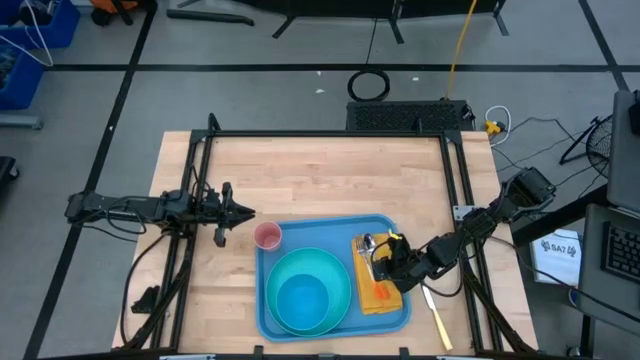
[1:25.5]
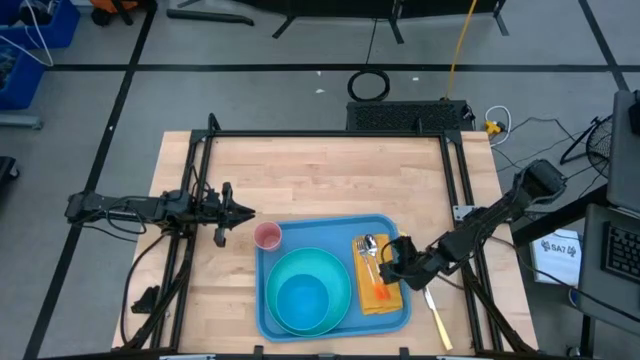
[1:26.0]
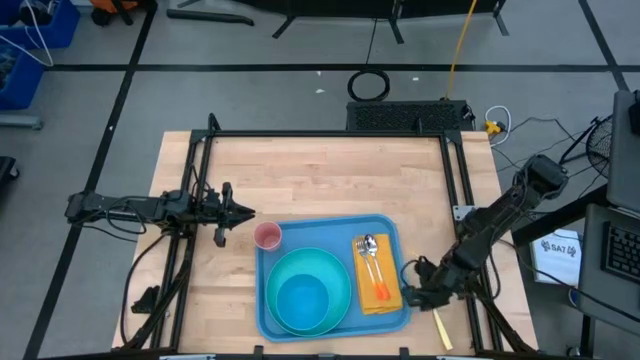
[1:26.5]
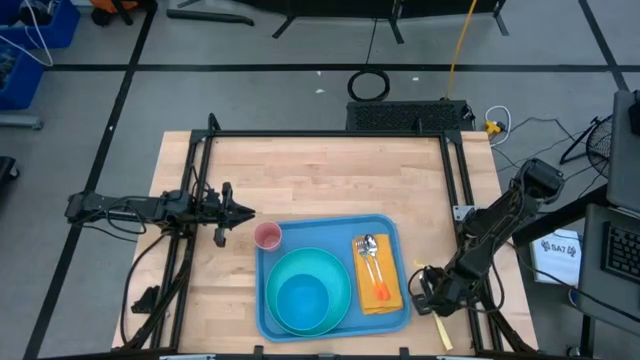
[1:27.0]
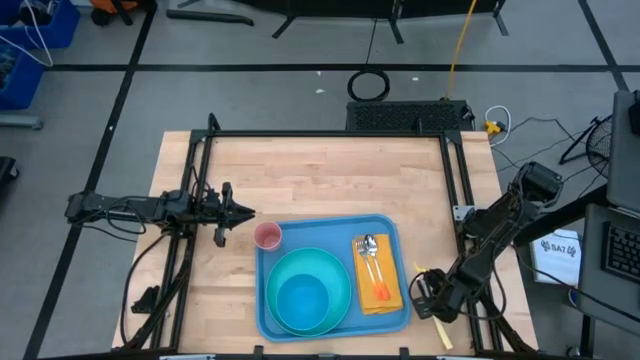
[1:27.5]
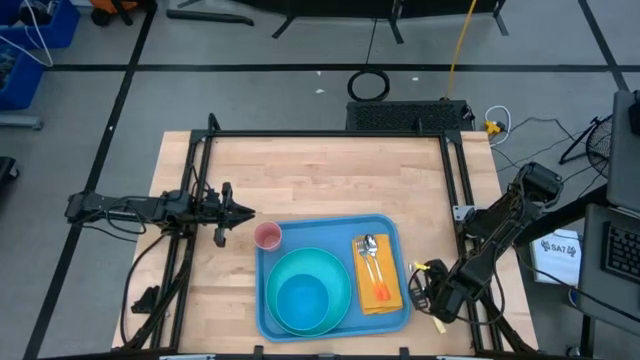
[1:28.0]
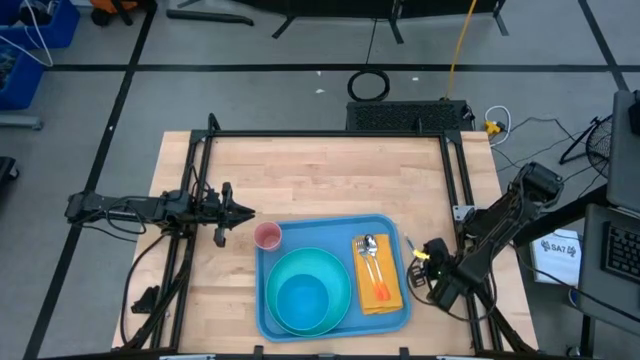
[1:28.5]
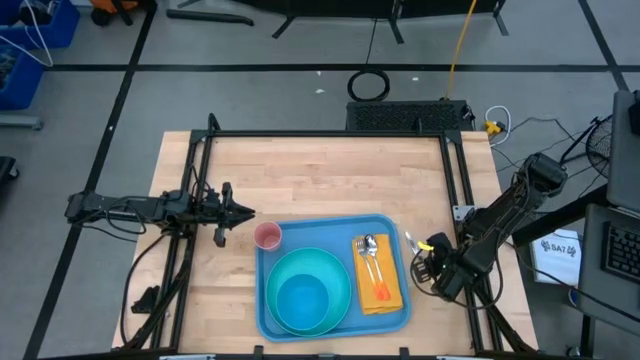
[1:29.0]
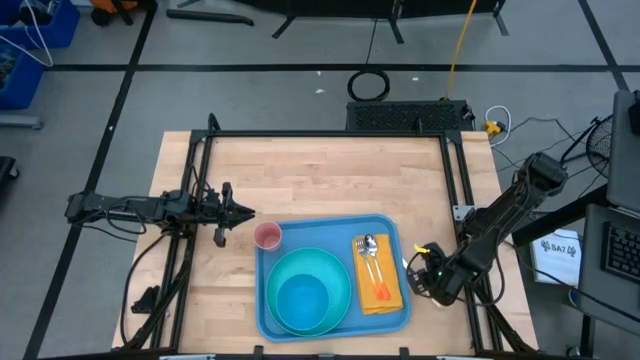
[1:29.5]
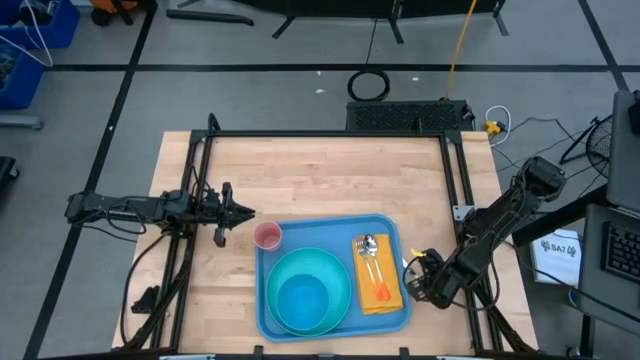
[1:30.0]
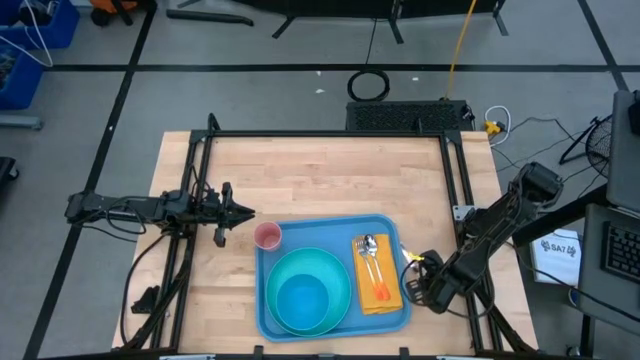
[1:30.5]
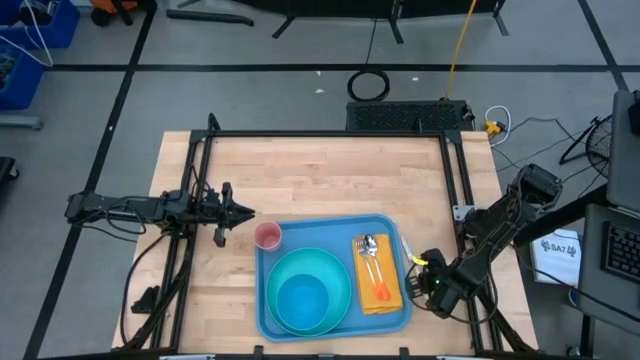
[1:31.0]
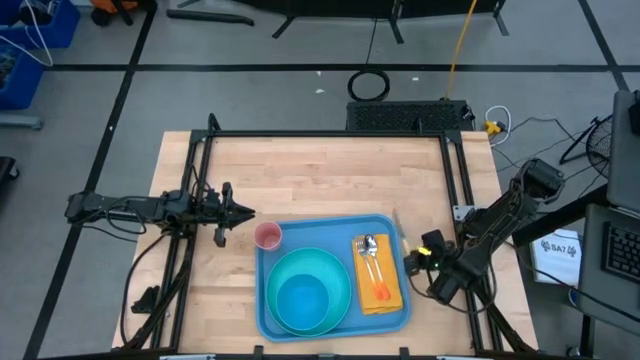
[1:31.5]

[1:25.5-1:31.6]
Task: Set up tray
Put the yellow knife on top of the yellow napkin to the right of the orange spoon

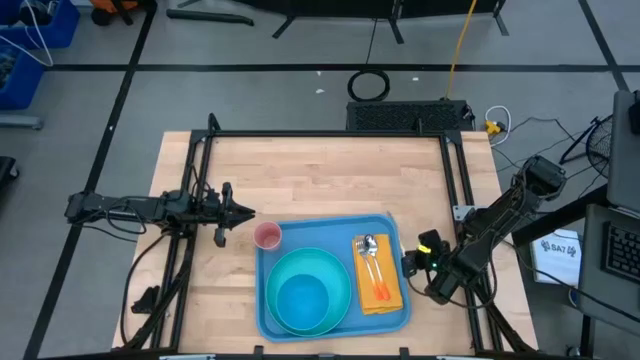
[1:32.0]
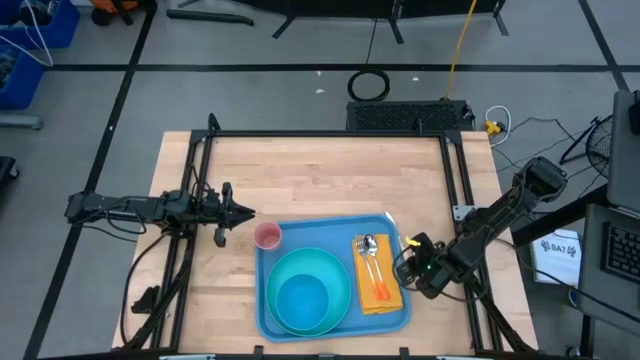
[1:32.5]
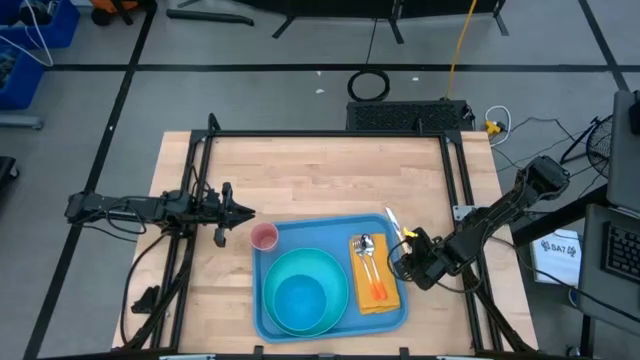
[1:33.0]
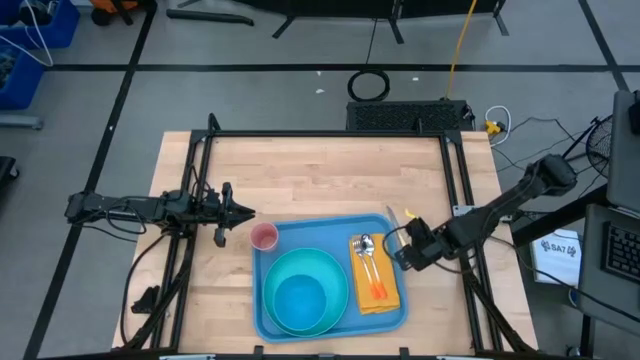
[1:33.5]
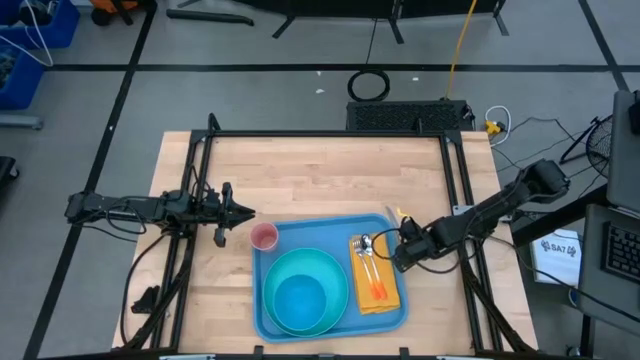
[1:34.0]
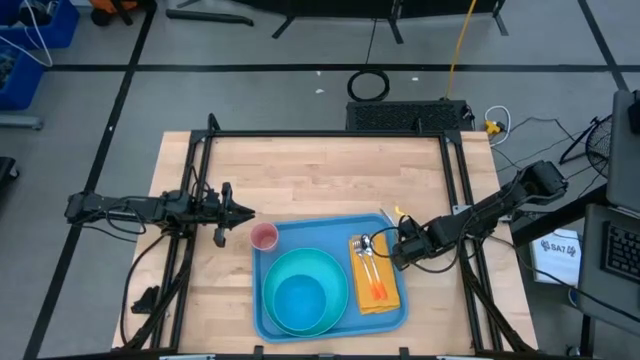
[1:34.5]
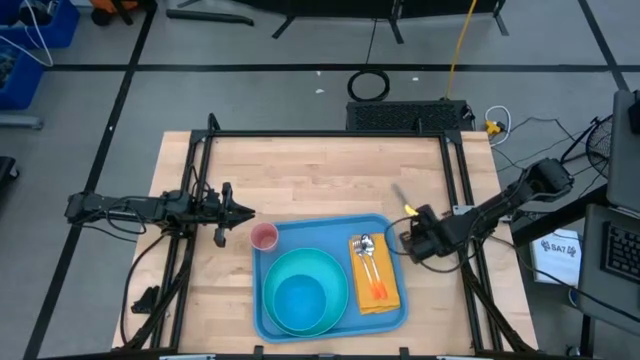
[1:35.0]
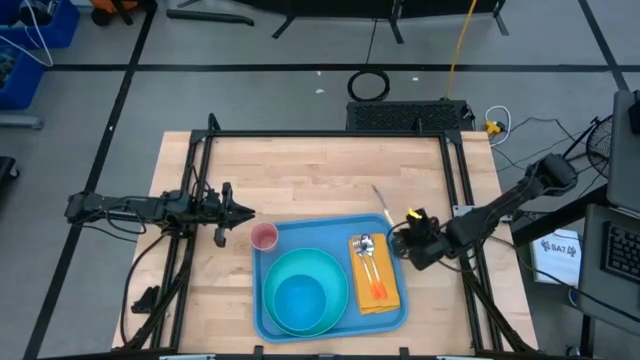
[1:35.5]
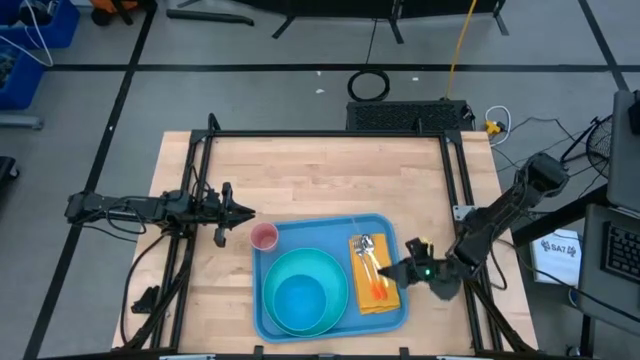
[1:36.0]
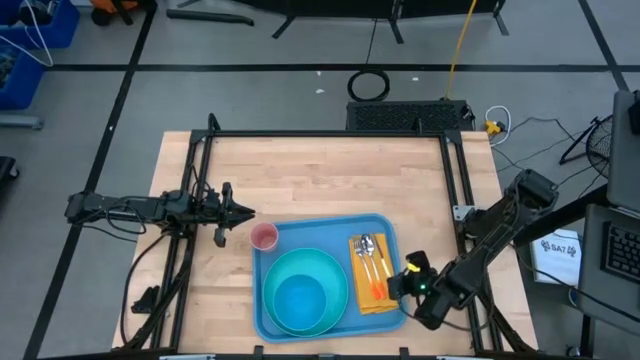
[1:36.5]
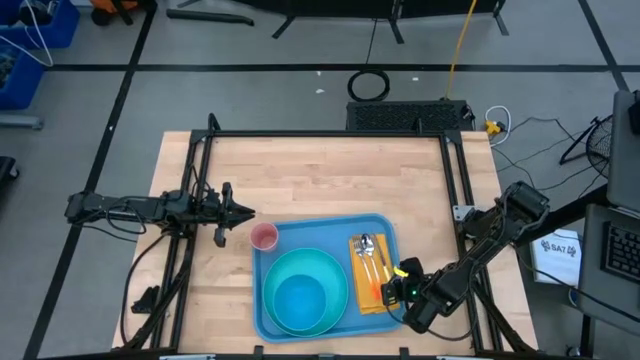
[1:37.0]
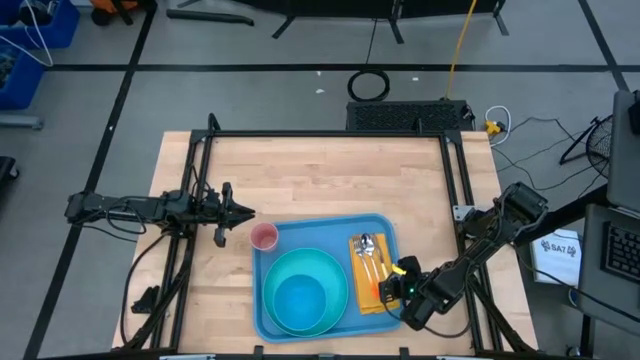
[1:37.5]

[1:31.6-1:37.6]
Put the yellow knife on top of the yellow napkin to the right of the orange spoon

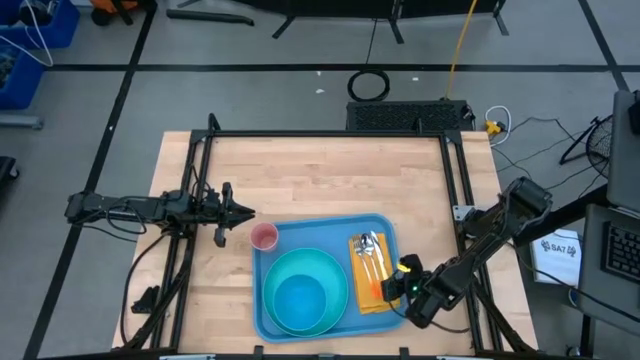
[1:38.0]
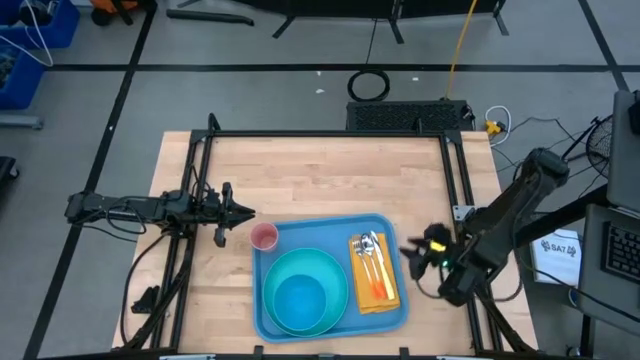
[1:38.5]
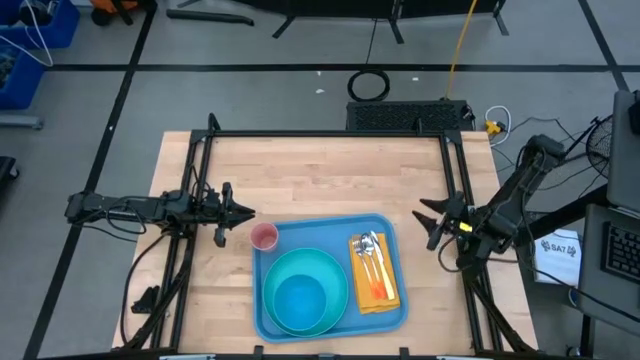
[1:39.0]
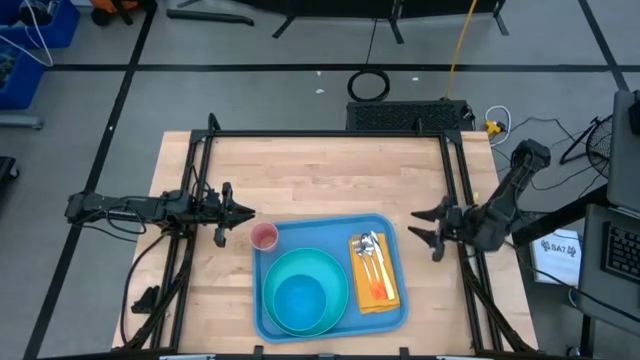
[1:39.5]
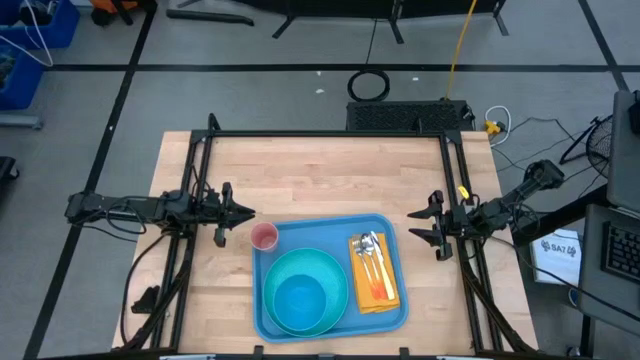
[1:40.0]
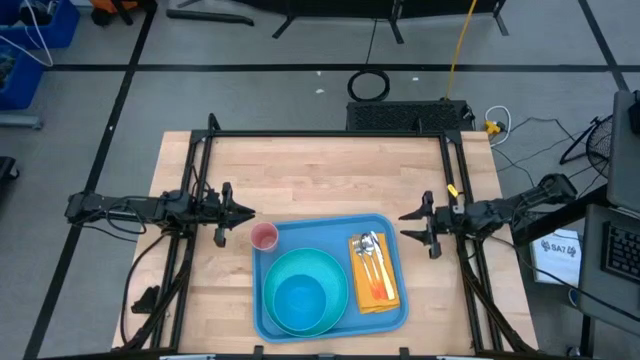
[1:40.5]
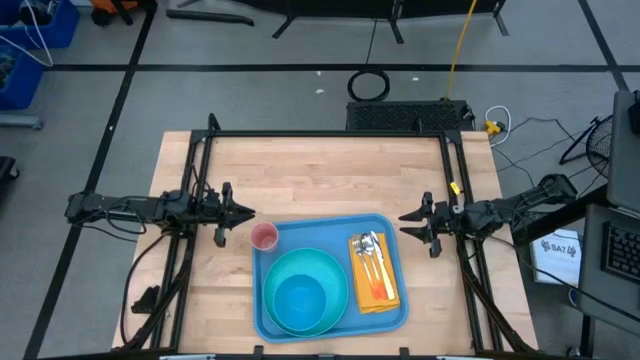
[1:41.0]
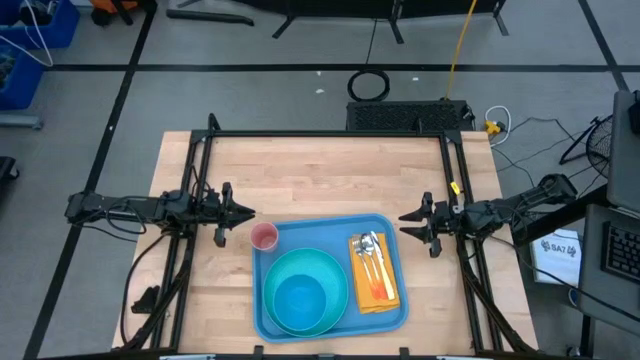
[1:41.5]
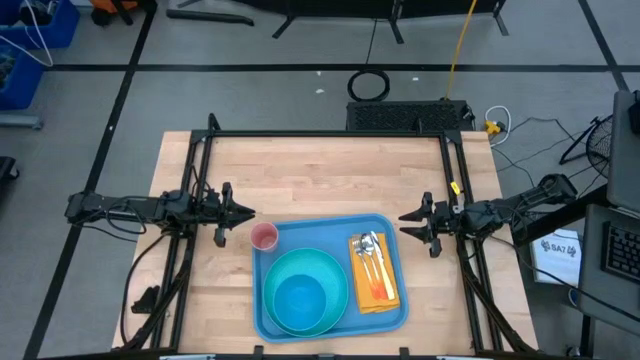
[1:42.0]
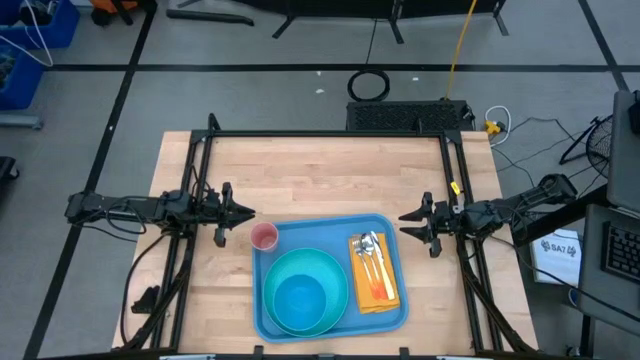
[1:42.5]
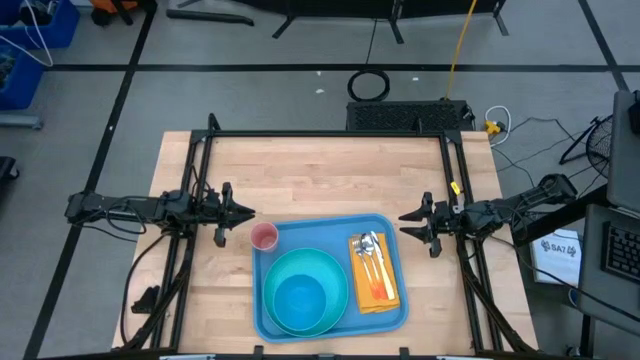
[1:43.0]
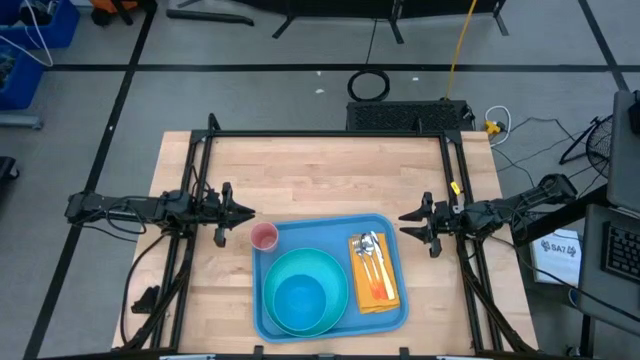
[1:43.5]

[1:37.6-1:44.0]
Return to Home Position

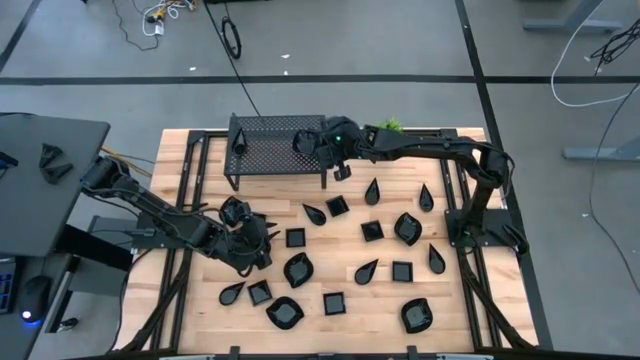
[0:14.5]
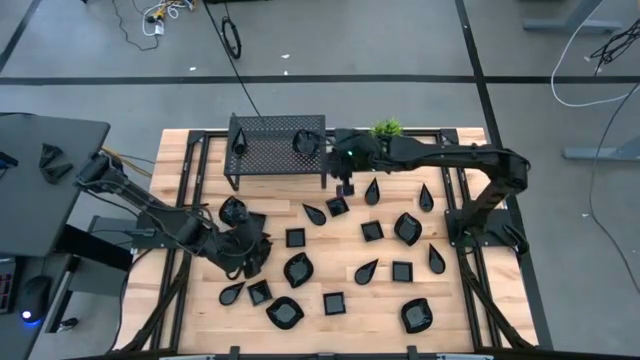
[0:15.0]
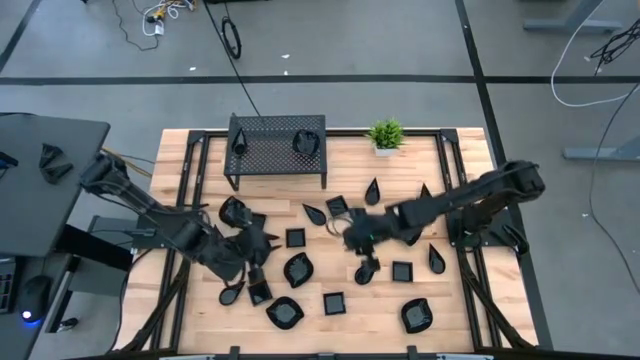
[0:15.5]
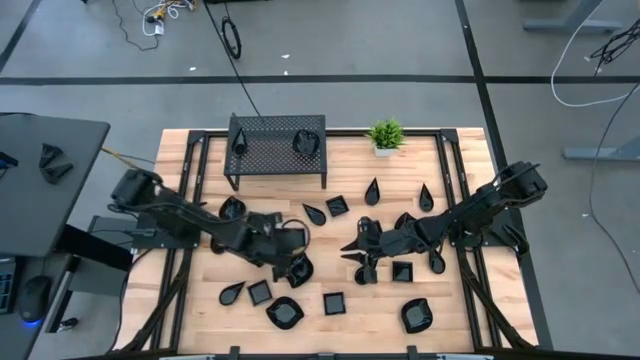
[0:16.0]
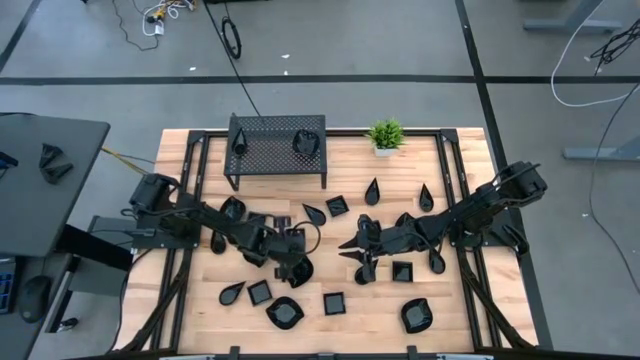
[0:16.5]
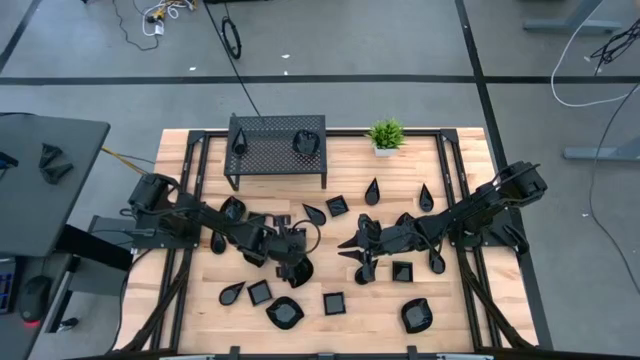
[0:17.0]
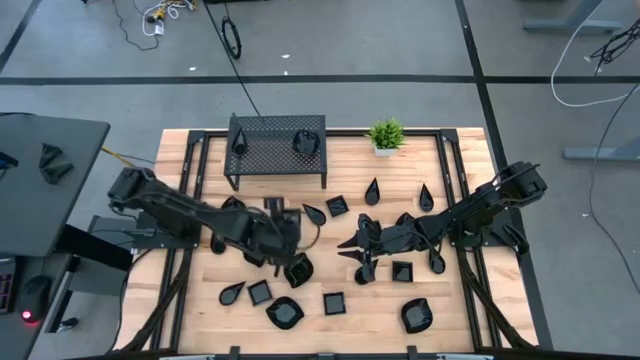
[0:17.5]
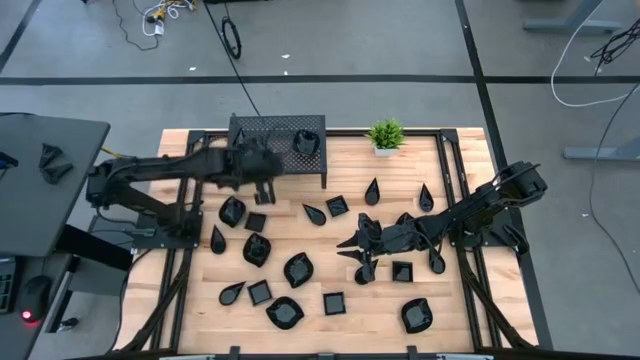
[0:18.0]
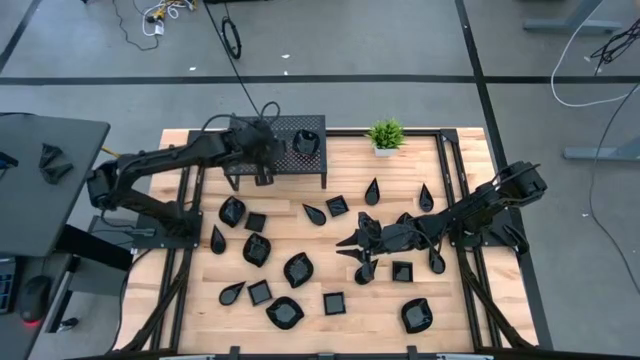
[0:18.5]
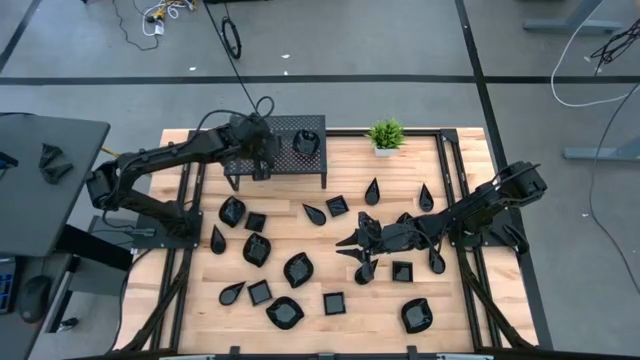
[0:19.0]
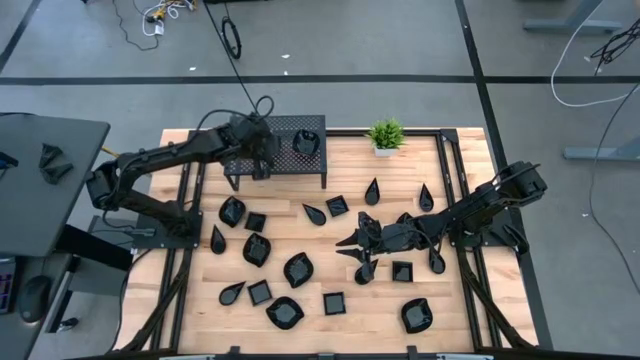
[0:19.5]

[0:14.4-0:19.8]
Task: Pick & Place Mini shaped plates
Put the black square plate on the shelf
